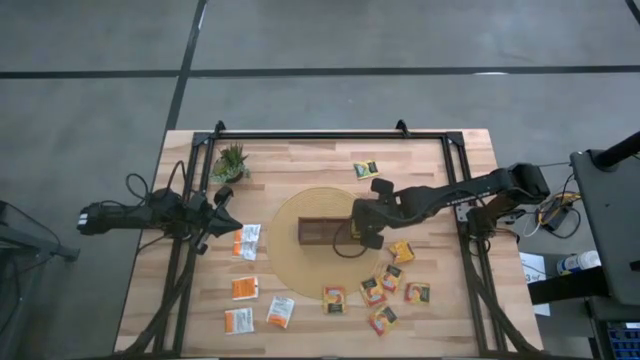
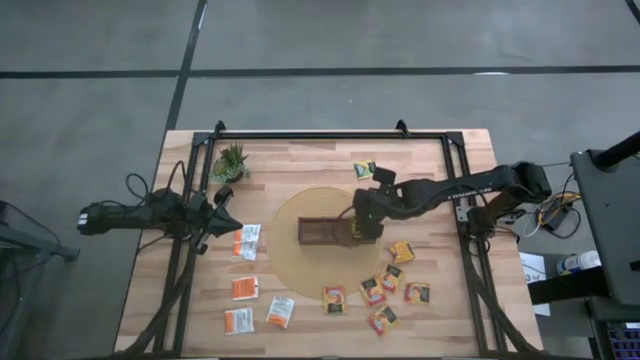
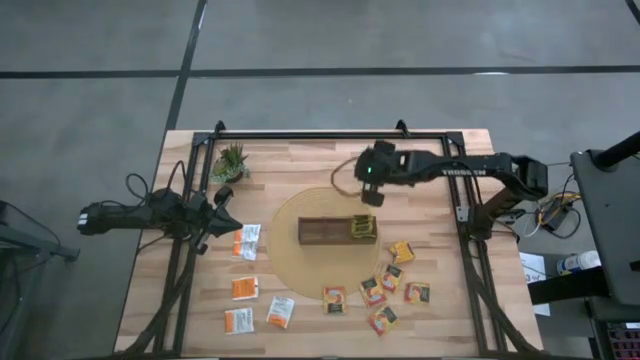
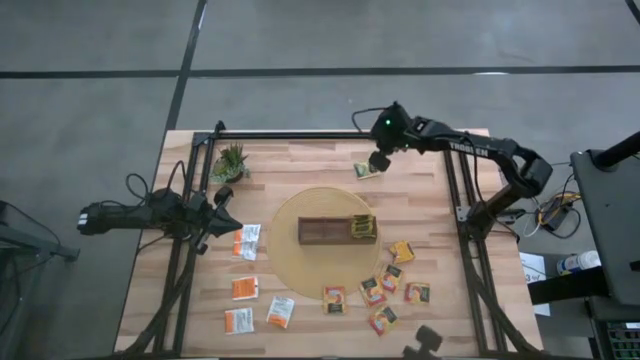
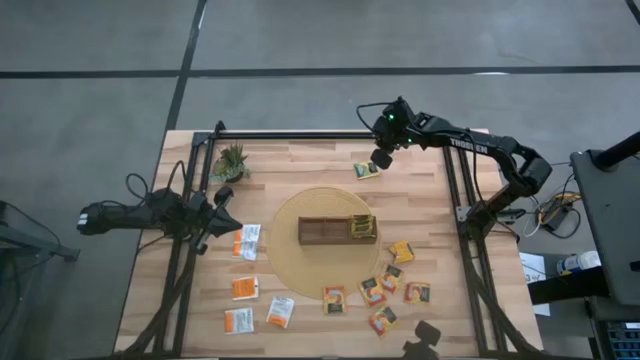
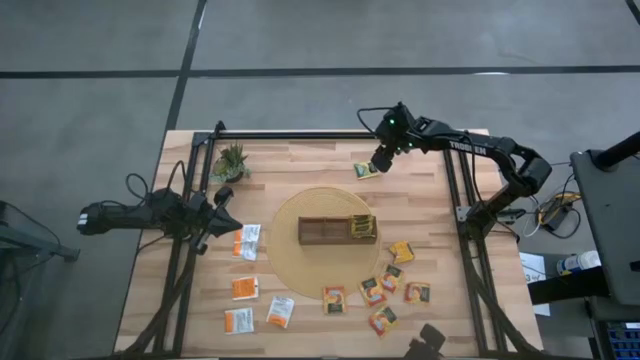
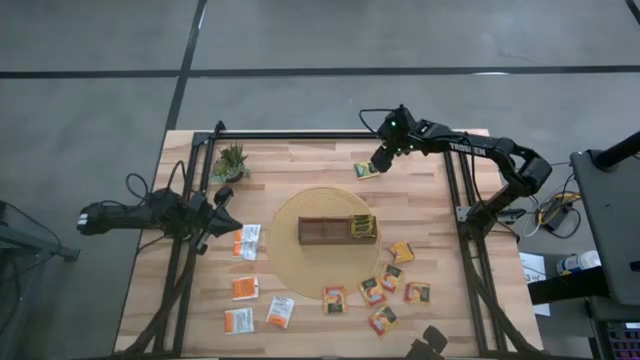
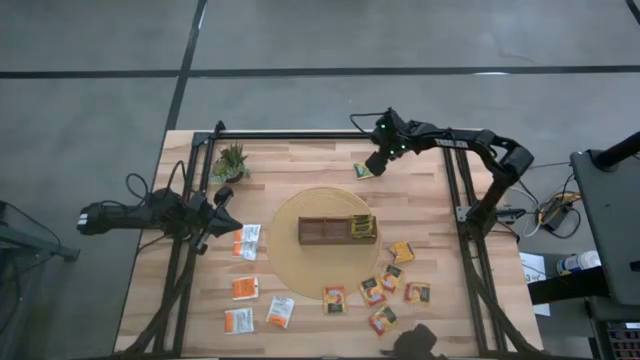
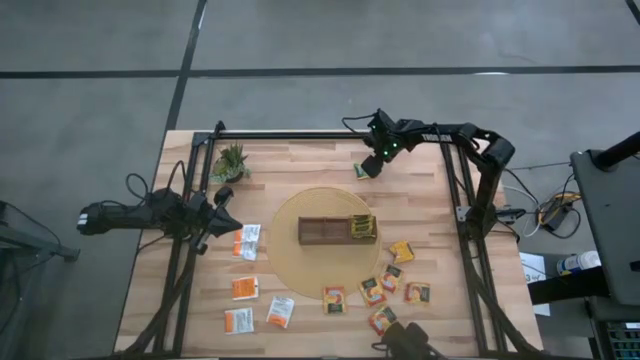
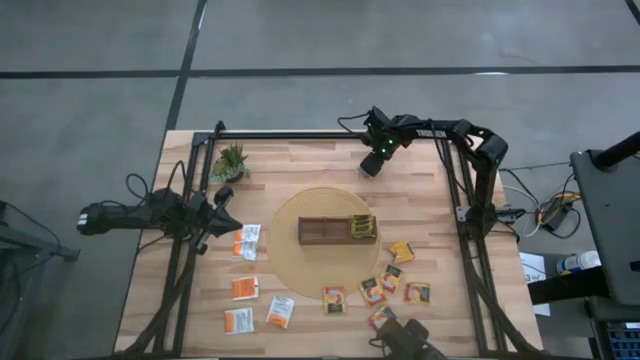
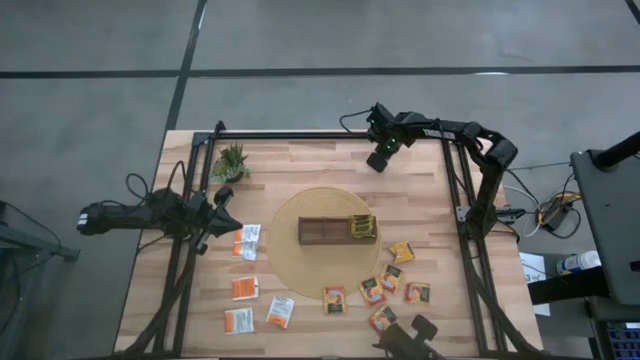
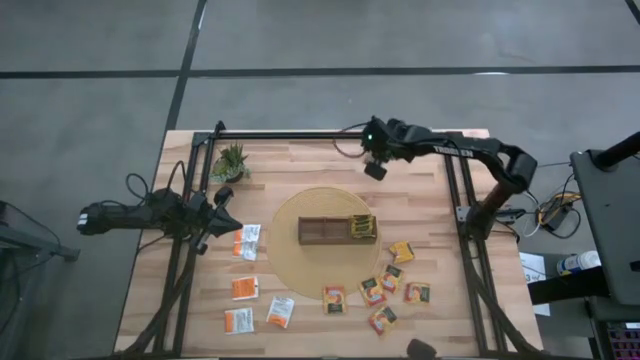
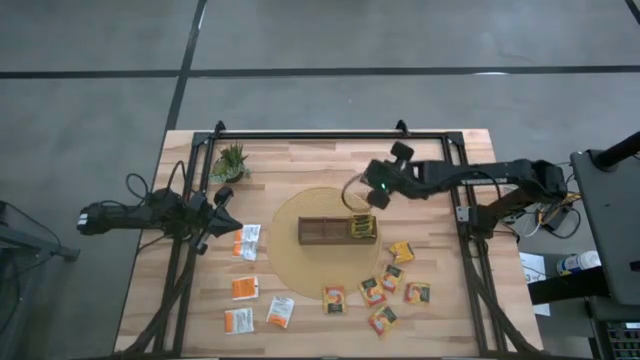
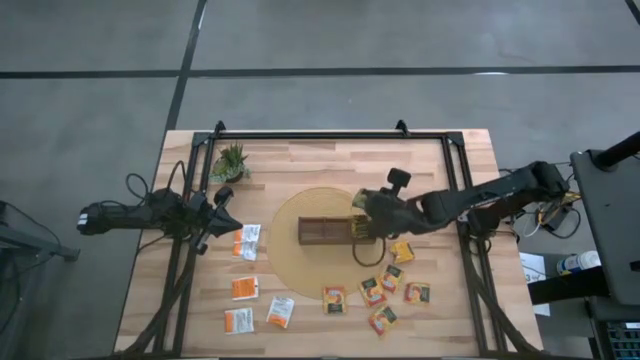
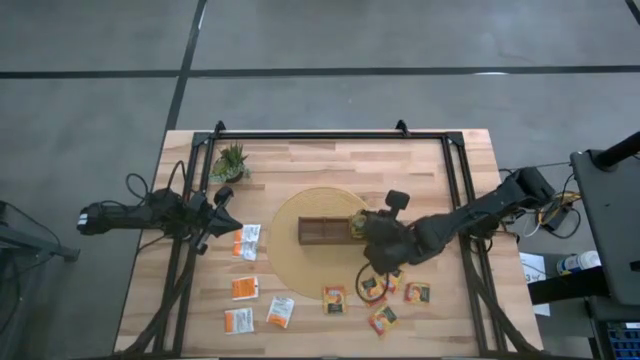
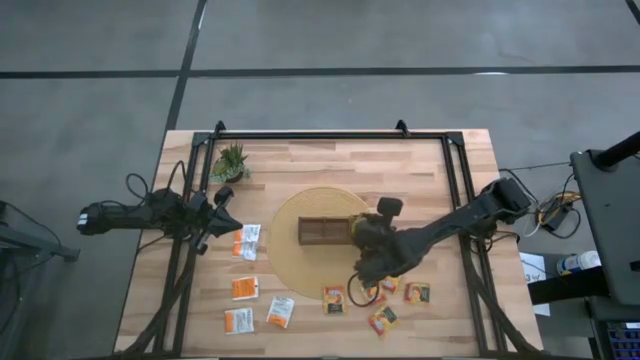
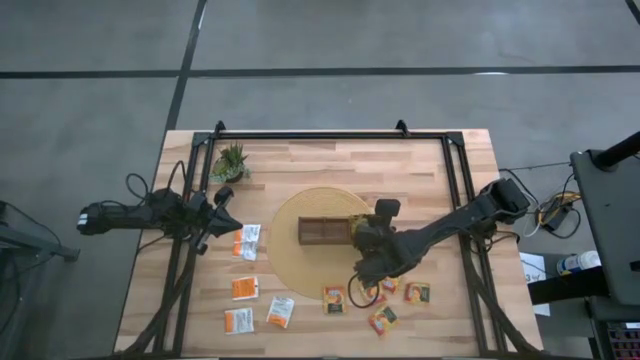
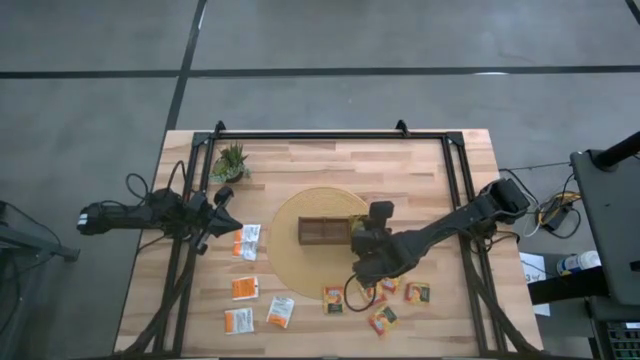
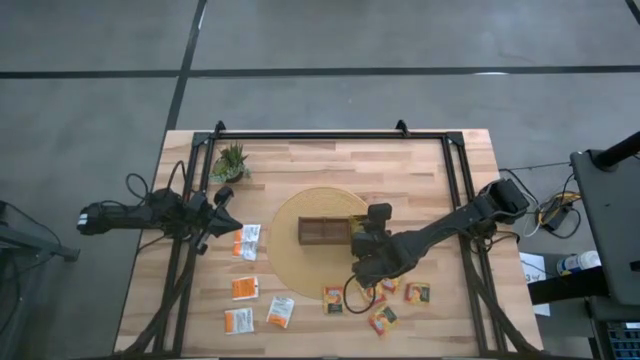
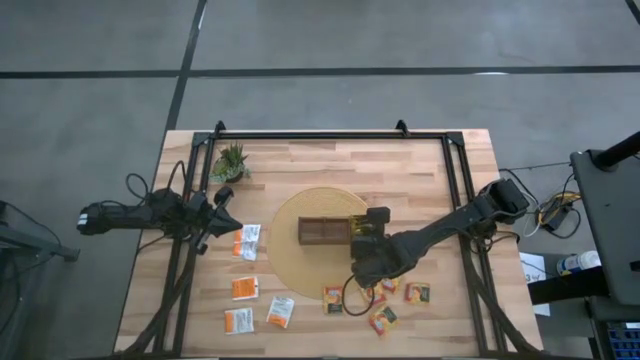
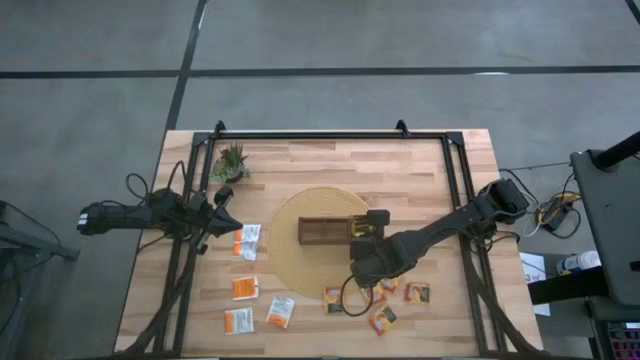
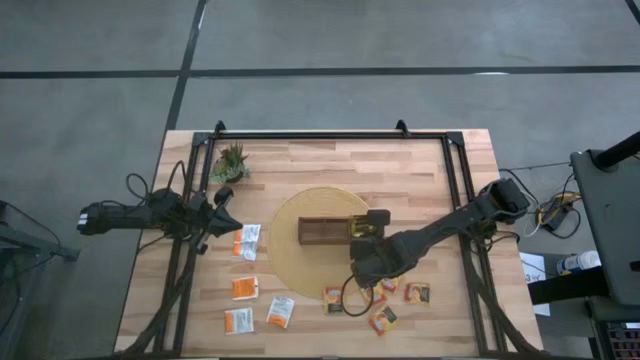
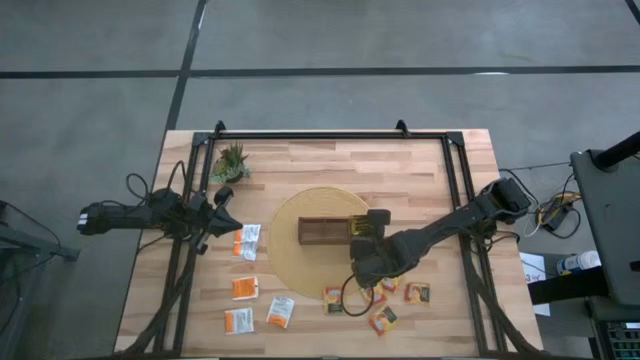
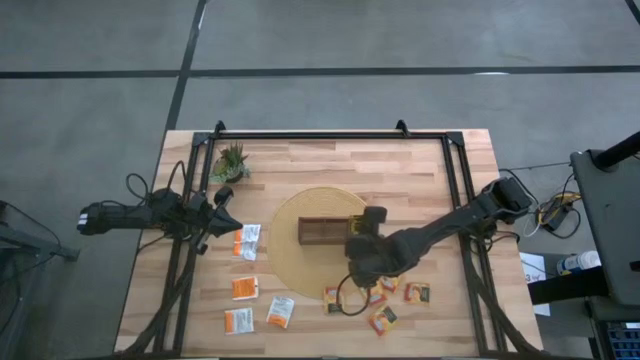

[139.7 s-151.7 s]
Task: Pick & Place Tea
Put the yellow tea bag into the right of the wooden organizer

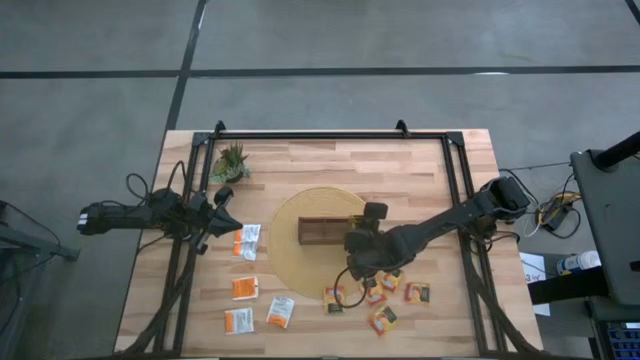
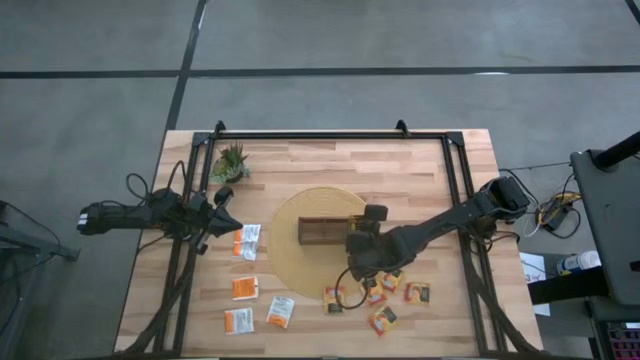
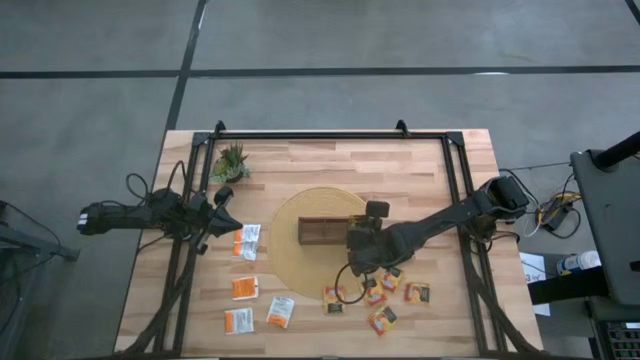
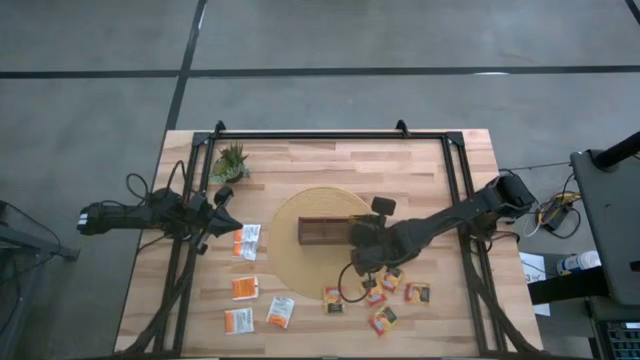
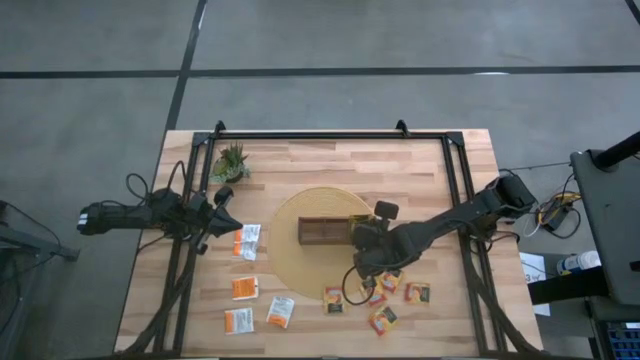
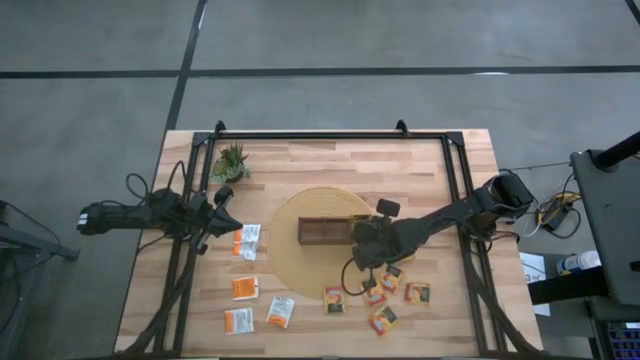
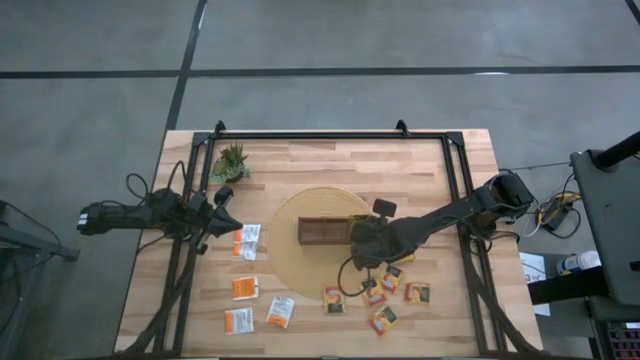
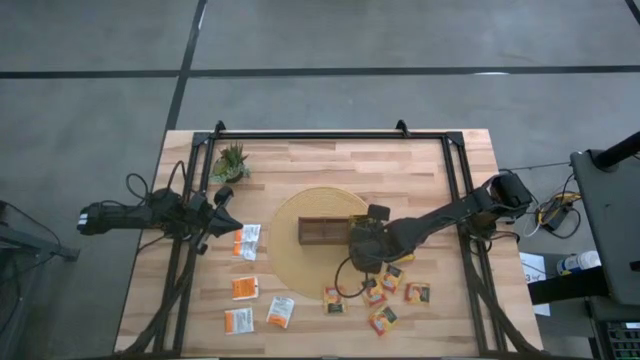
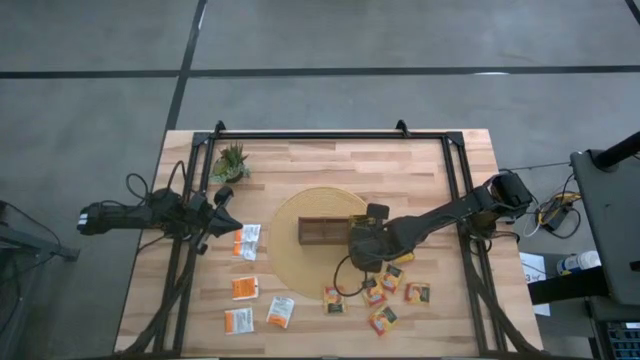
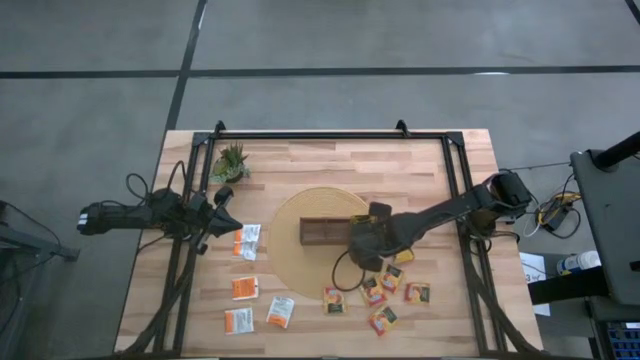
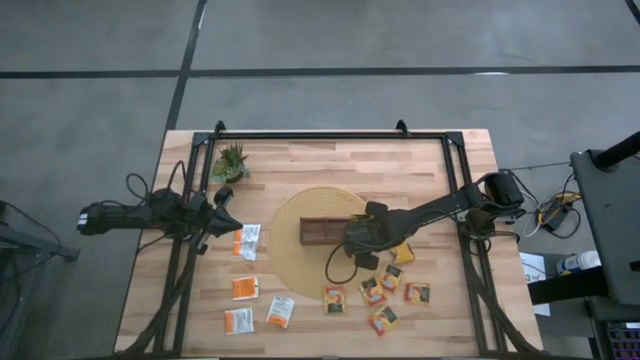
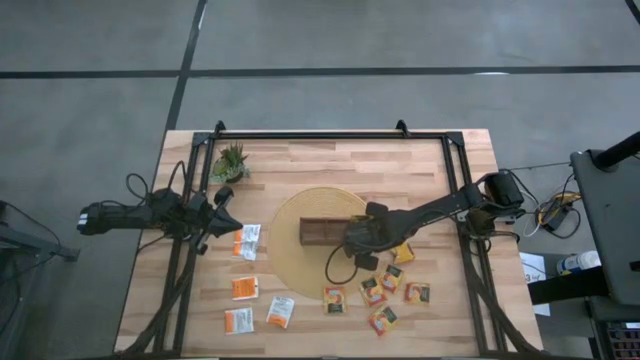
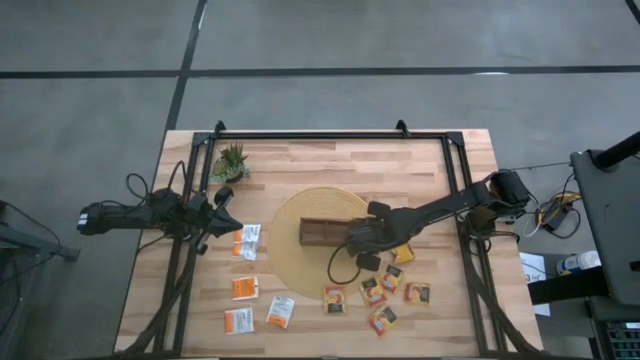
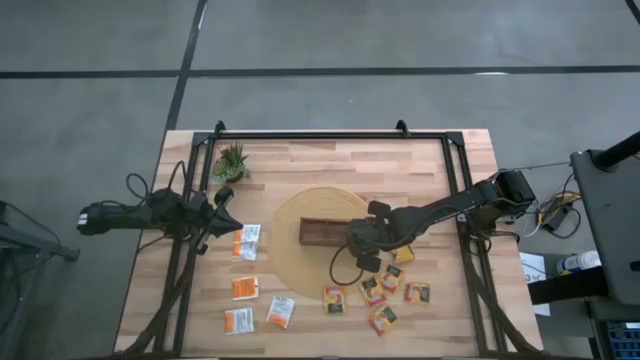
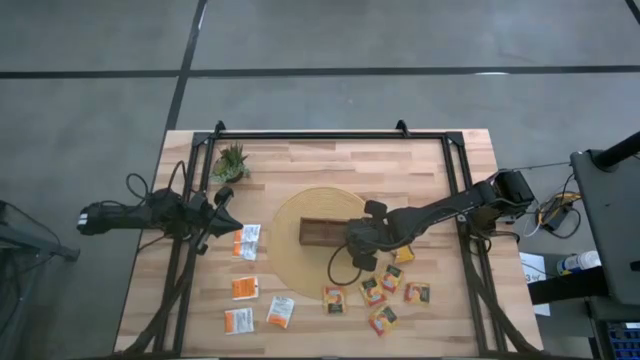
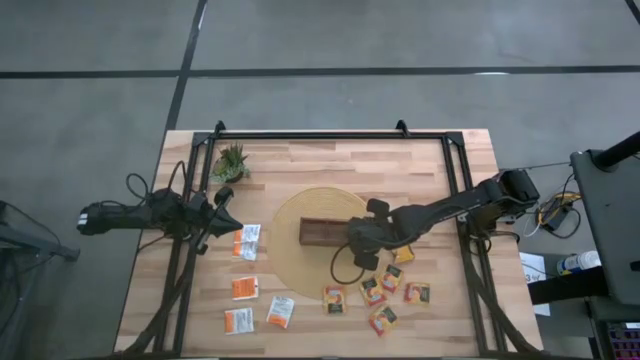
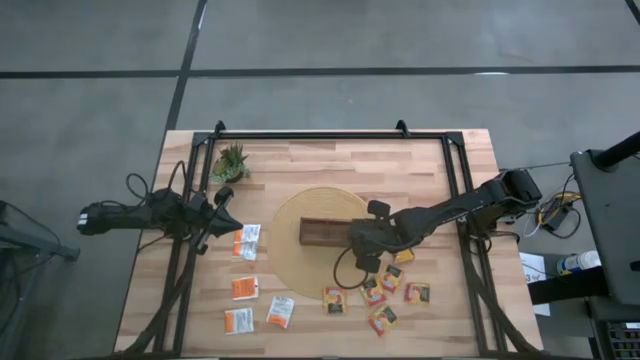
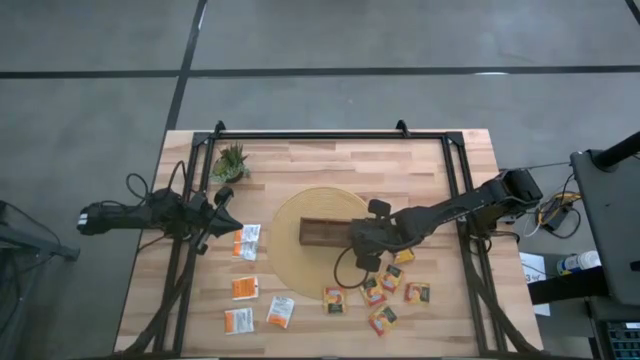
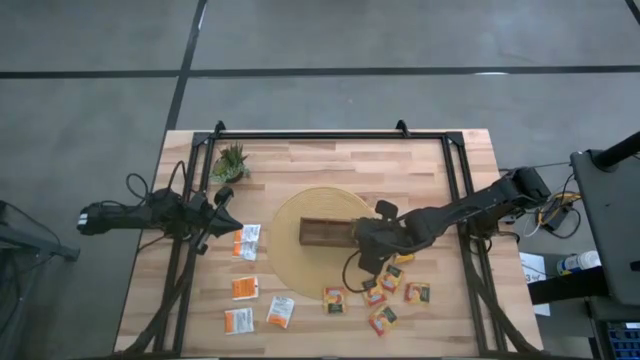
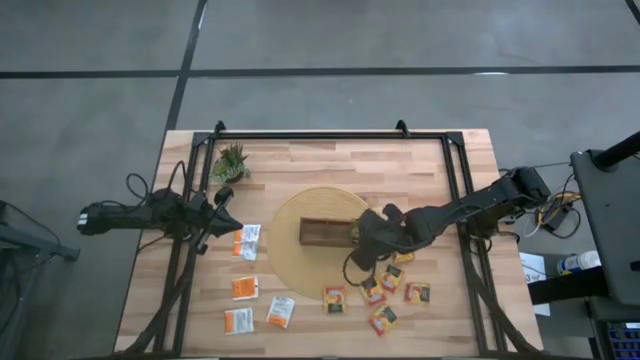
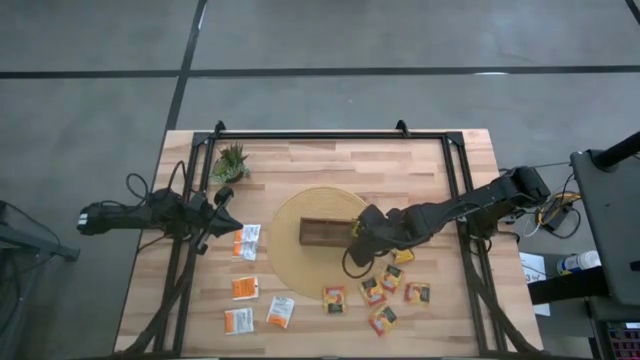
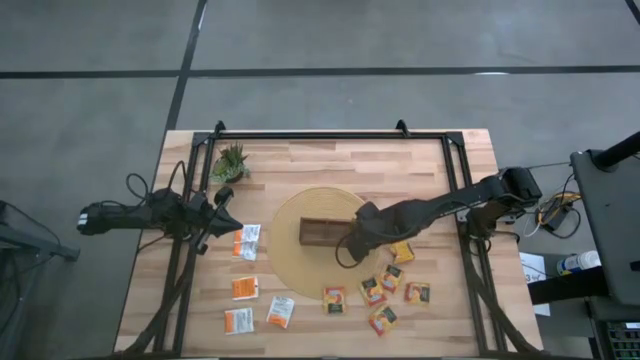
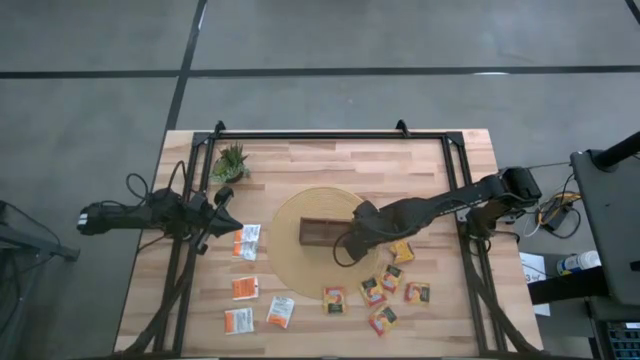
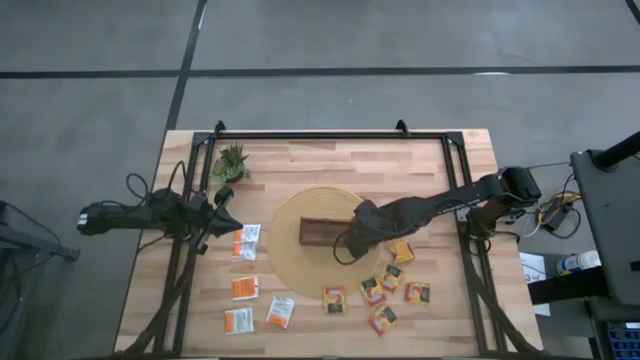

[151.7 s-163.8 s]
Put the yellow tea bag into the right of the wooden organizer
